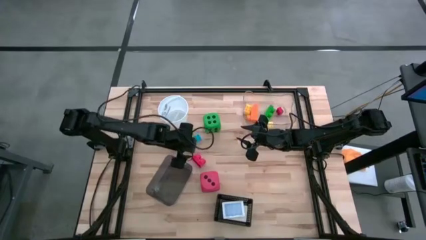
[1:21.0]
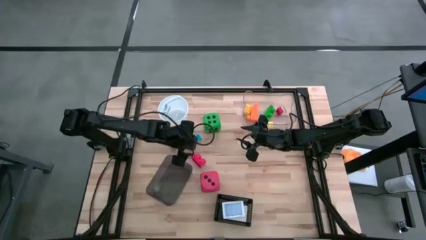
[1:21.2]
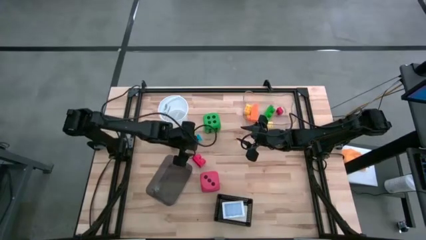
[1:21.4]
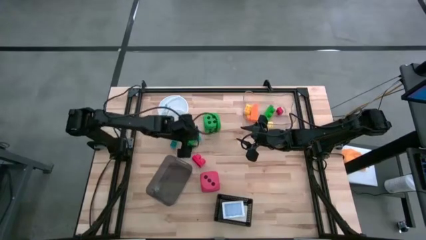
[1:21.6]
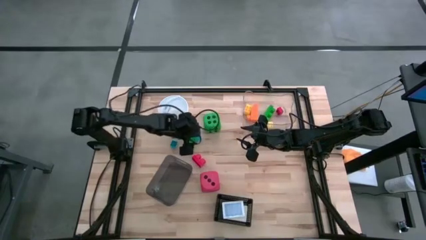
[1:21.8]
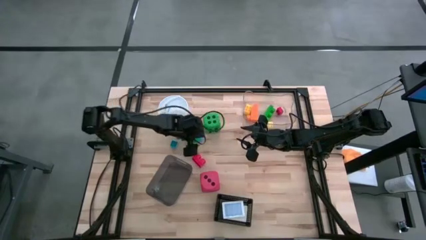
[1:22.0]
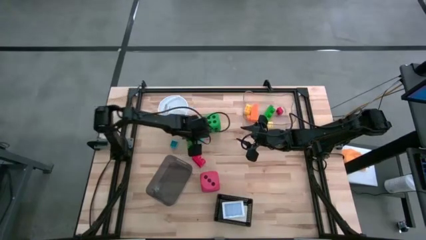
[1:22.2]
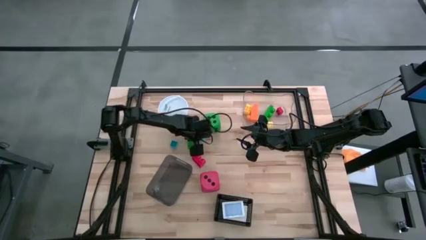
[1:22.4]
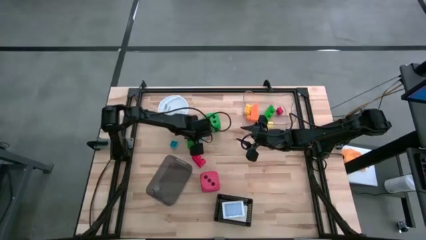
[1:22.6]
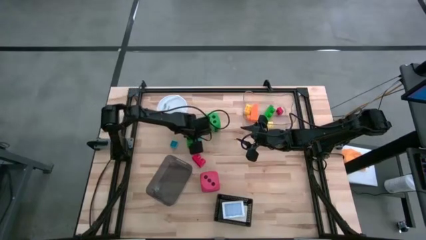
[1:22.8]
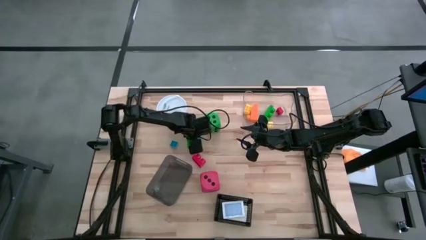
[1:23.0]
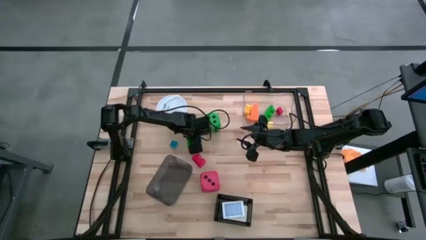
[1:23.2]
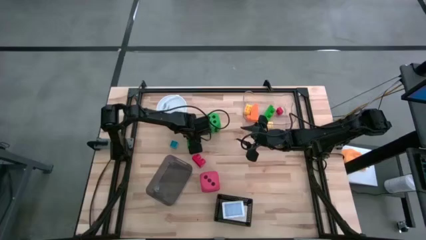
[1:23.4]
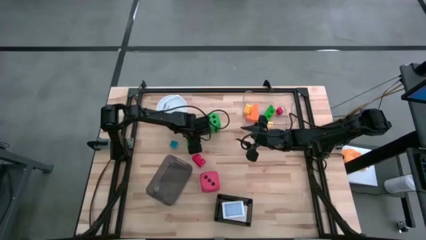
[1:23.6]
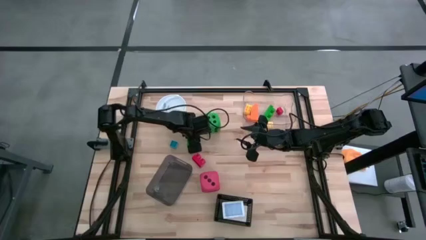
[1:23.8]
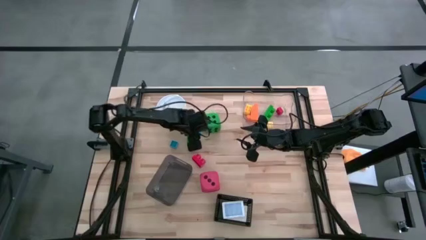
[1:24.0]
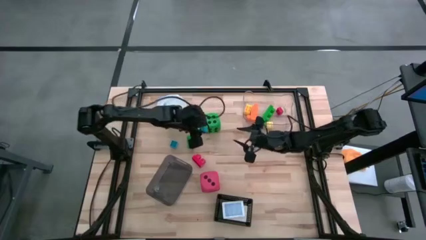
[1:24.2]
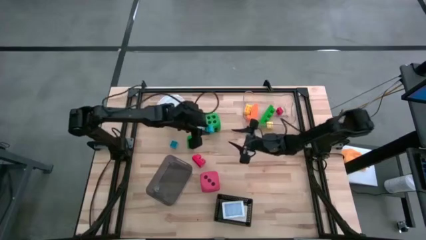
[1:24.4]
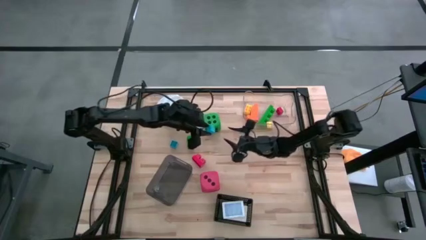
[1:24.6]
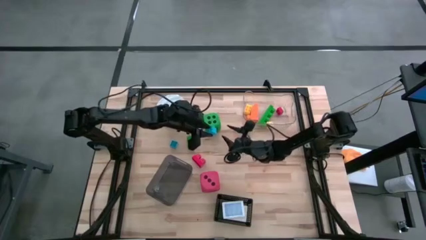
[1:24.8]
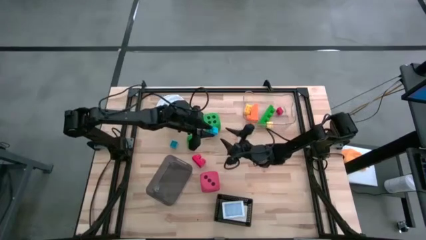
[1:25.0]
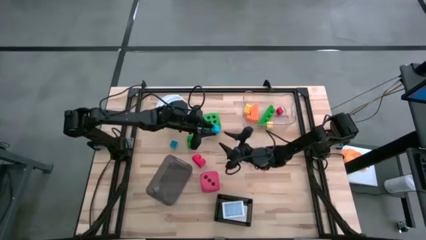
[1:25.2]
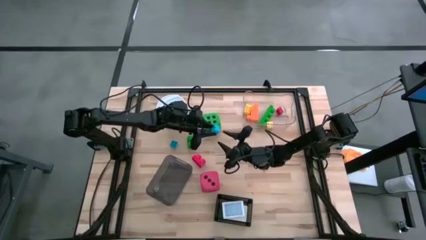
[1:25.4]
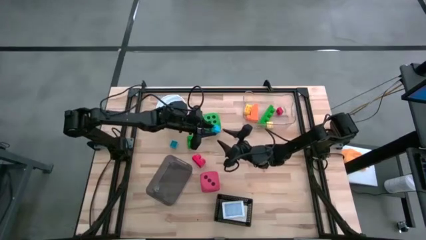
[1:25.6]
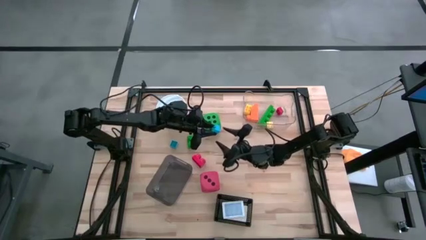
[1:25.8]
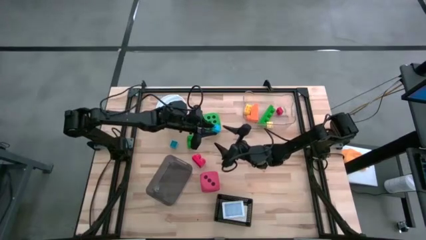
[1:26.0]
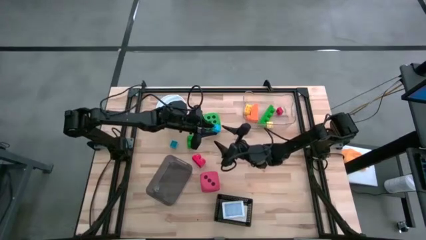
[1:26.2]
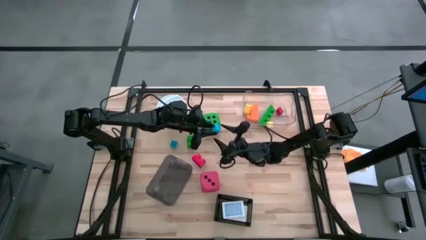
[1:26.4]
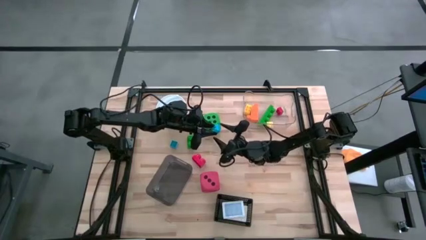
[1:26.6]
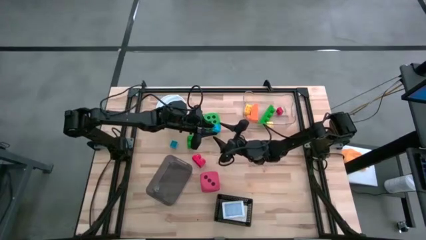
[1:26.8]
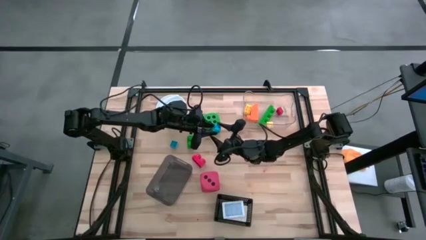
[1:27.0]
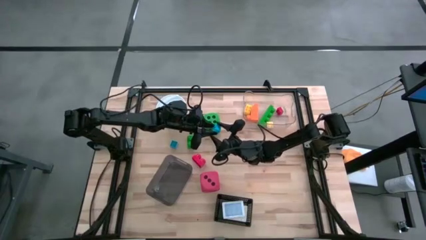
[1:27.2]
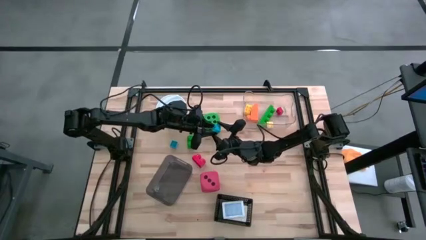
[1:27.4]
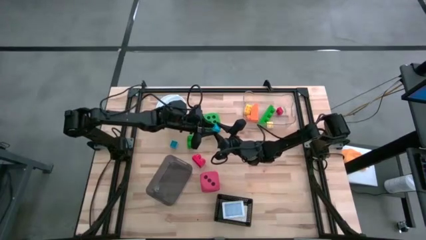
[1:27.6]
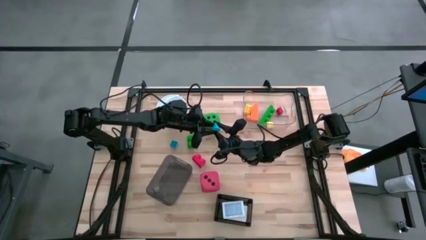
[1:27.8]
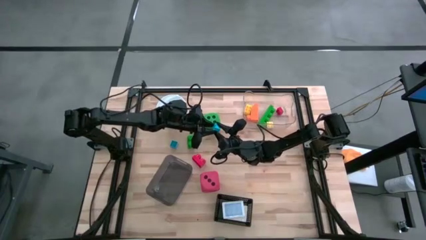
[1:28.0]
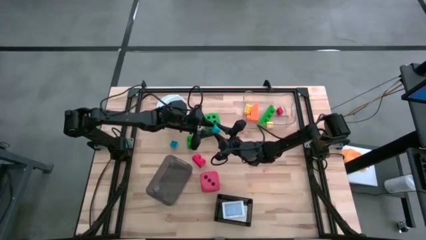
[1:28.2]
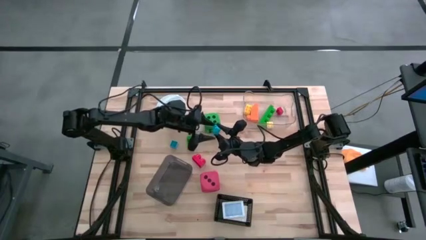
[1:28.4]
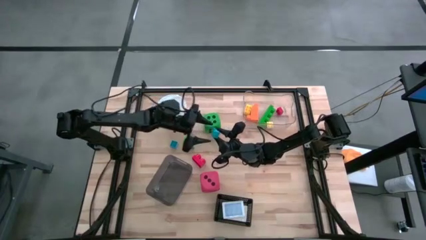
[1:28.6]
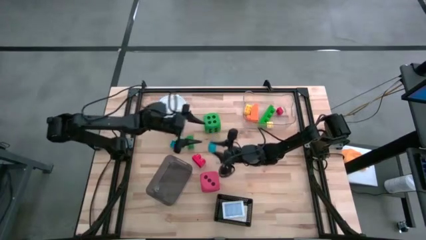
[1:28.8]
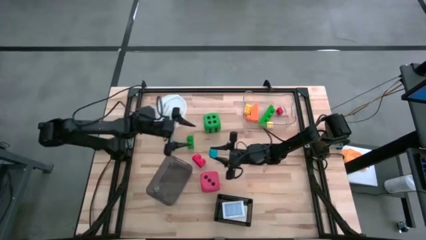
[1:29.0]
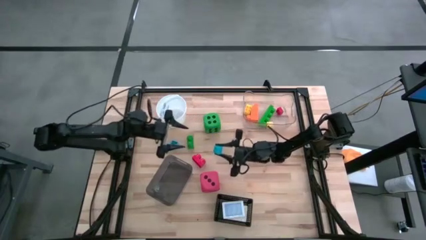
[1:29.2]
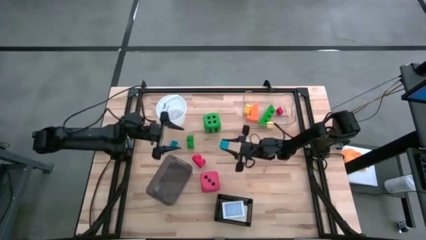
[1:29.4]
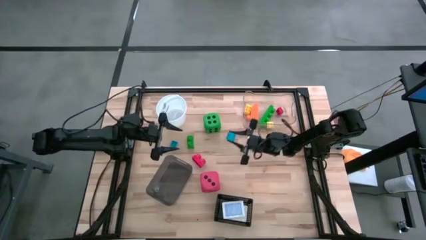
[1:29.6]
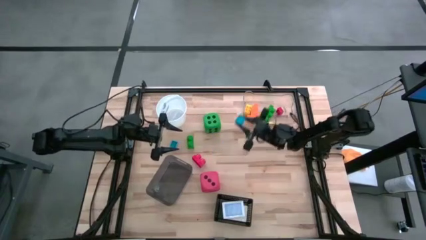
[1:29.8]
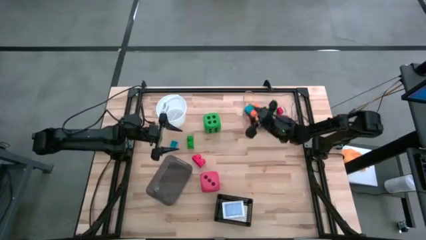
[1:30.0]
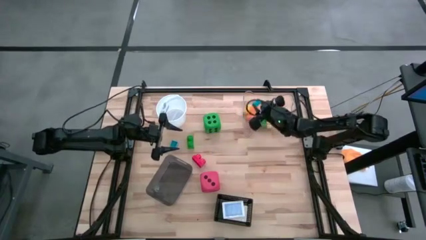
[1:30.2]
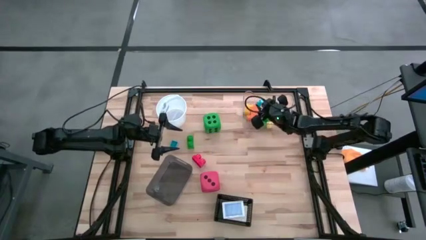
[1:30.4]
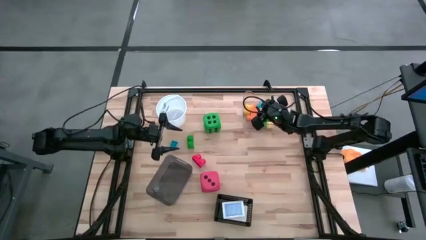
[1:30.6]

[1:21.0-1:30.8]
Task: Pick & Place Toys
Put the right blue game piece into the transparent bin

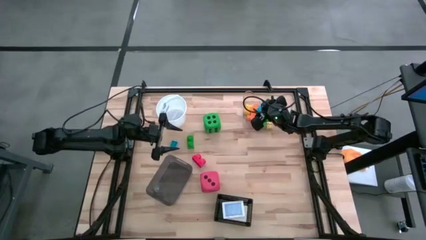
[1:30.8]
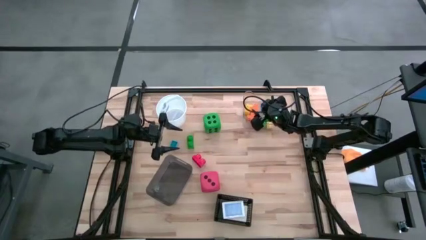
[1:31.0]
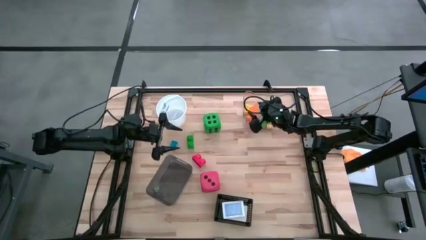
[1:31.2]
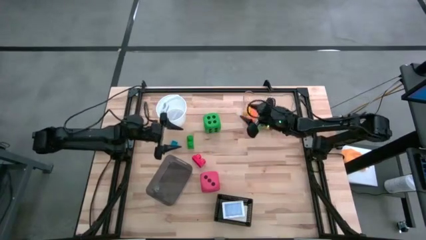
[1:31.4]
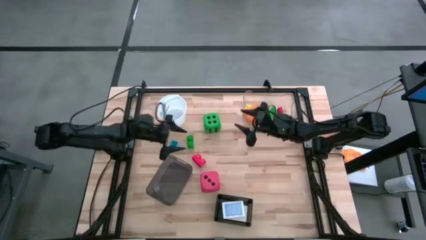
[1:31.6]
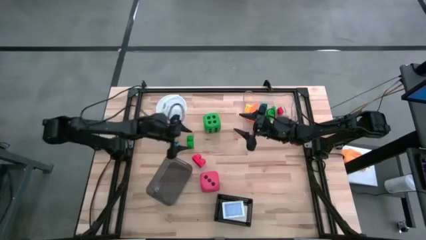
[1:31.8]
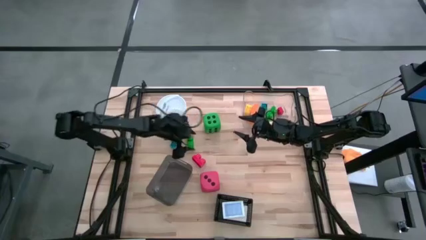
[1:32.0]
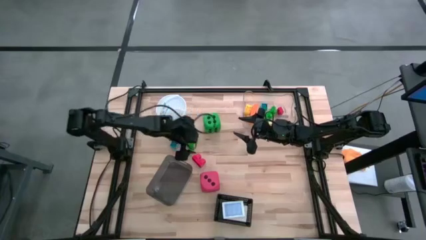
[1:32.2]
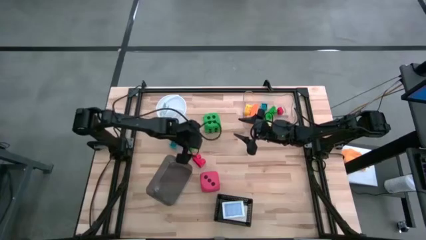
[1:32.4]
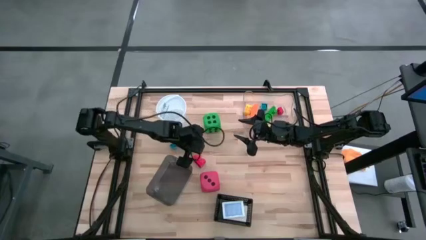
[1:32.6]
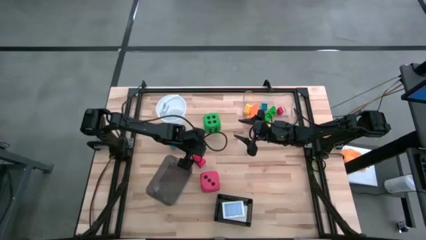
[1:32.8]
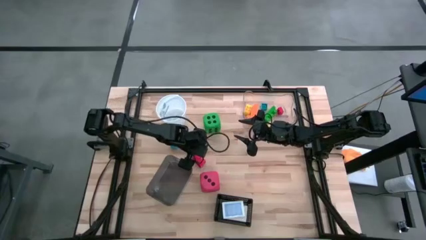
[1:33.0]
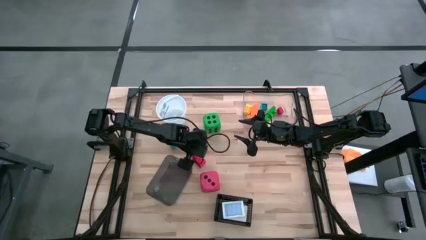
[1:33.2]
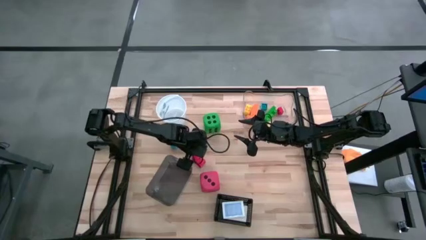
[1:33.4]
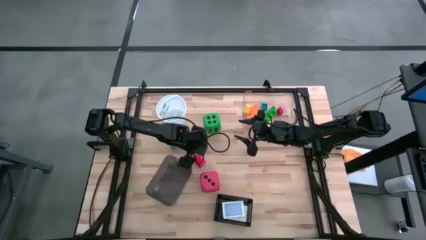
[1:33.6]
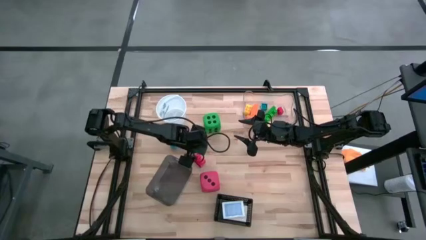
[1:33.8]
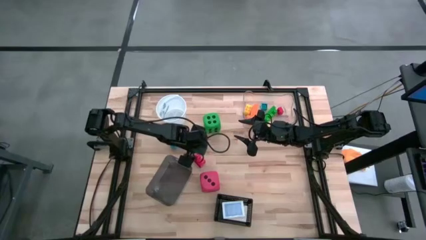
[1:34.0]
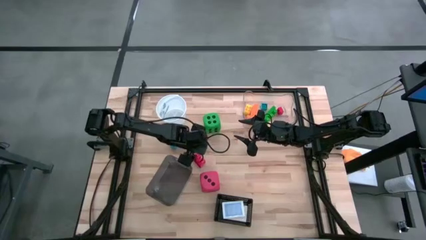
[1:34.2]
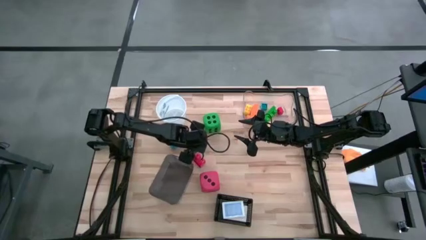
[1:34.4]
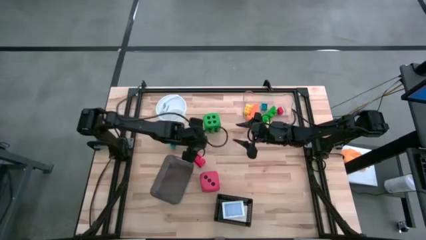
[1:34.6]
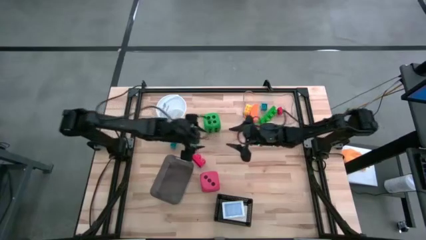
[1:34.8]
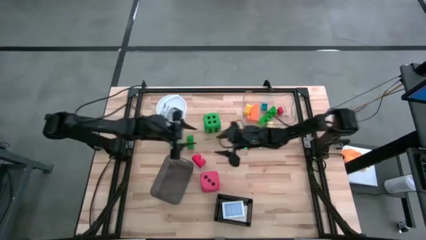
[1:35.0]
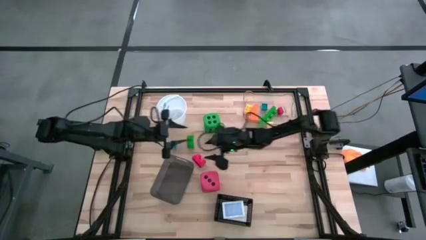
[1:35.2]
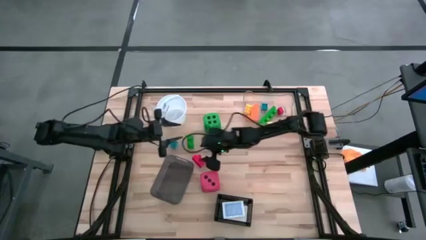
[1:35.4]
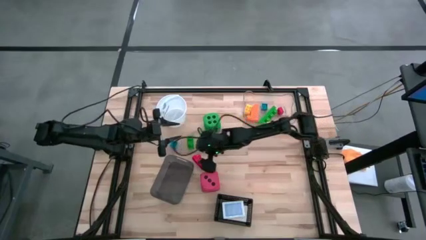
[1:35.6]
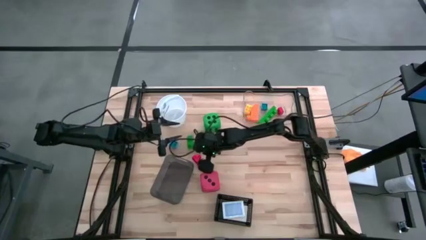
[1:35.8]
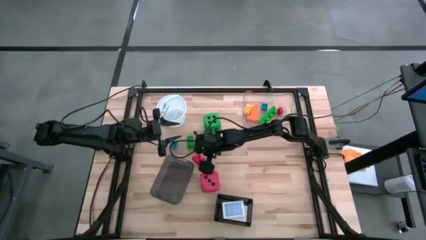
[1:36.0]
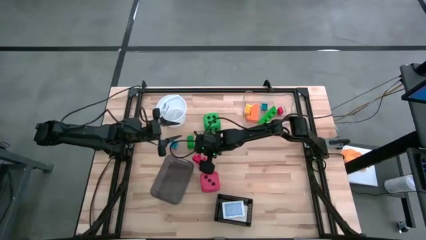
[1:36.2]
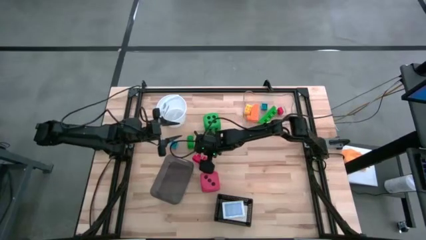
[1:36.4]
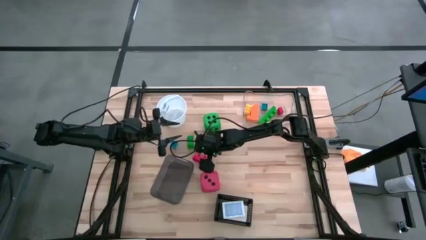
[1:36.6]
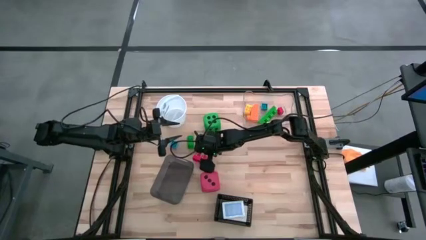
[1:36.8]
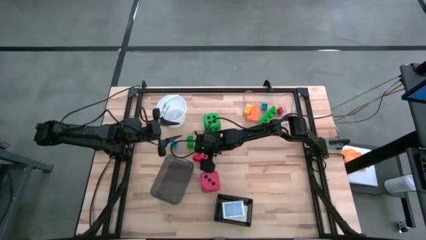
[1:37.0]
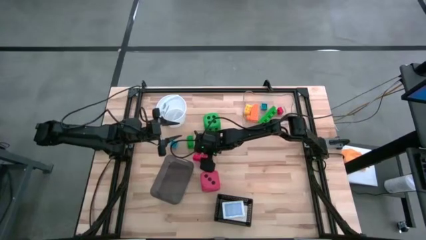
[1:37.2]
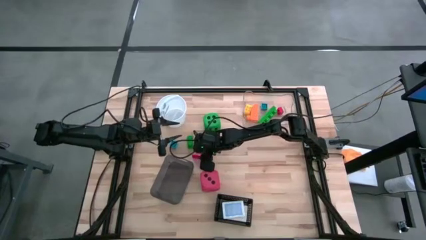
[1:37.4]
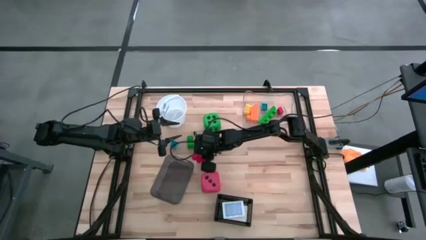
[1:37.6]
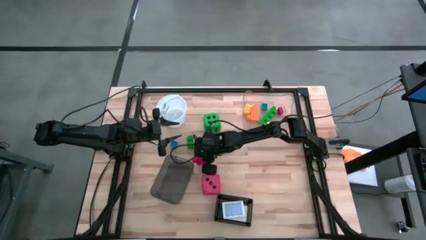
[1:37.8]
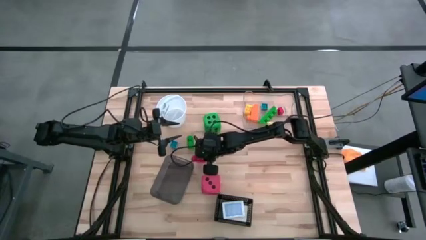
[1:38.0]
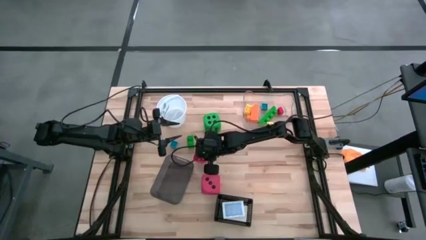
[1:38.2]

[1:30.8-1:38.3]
Put the red game piece into the transparent bin
